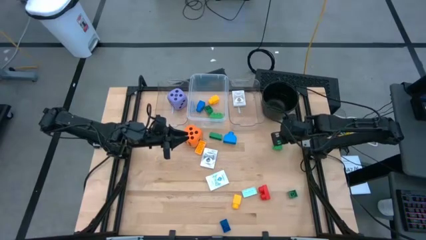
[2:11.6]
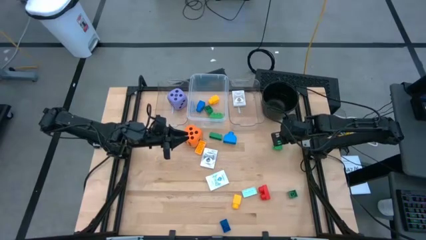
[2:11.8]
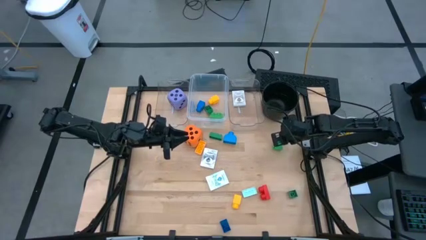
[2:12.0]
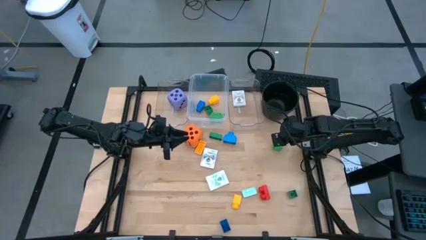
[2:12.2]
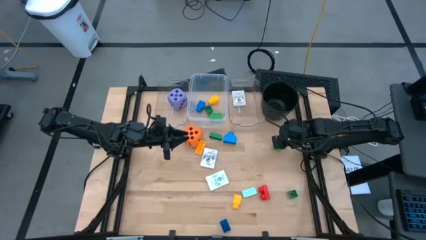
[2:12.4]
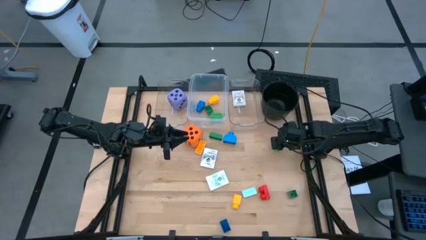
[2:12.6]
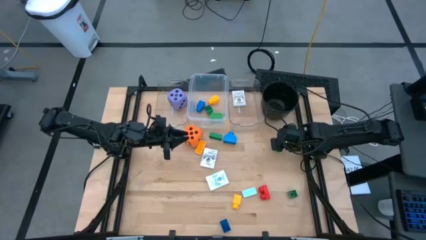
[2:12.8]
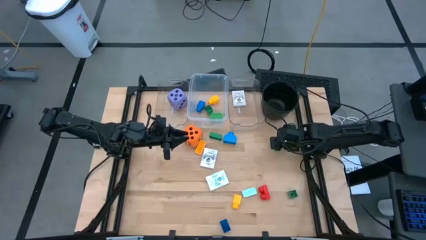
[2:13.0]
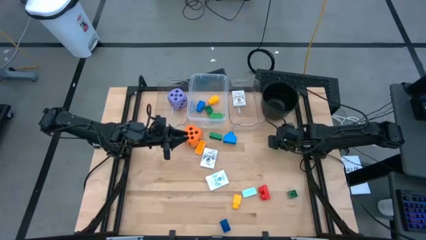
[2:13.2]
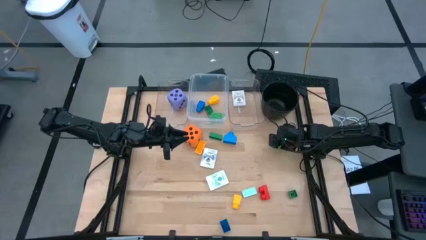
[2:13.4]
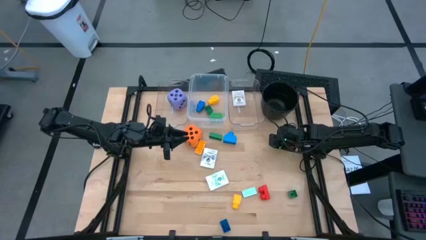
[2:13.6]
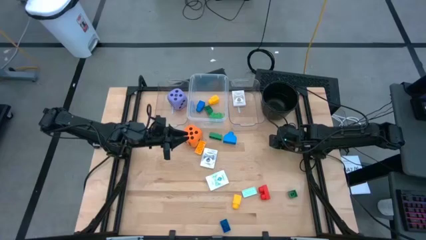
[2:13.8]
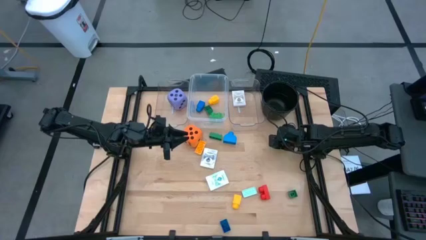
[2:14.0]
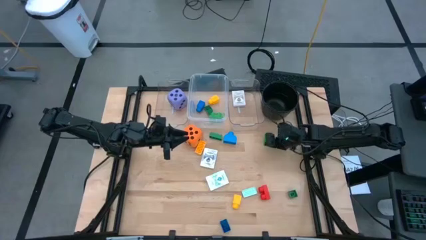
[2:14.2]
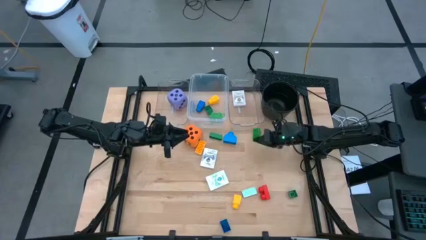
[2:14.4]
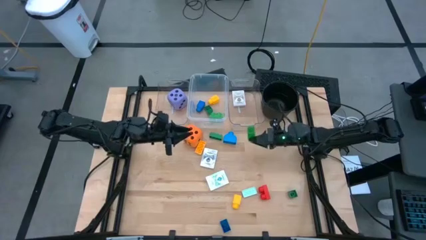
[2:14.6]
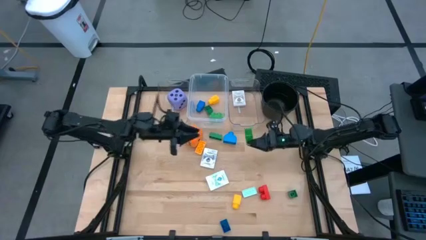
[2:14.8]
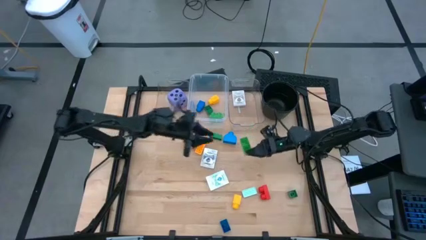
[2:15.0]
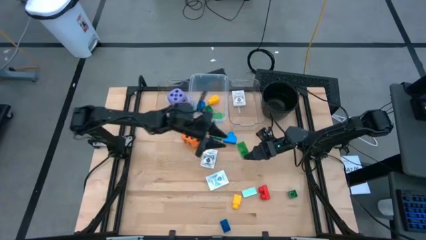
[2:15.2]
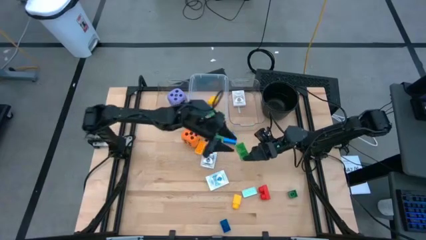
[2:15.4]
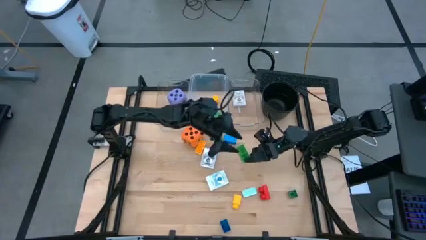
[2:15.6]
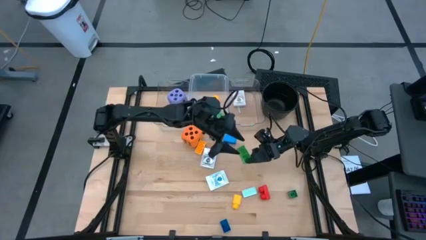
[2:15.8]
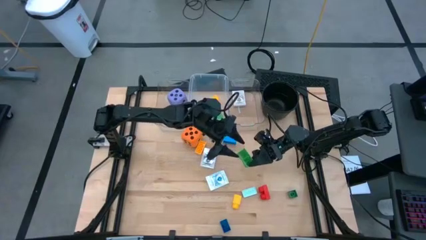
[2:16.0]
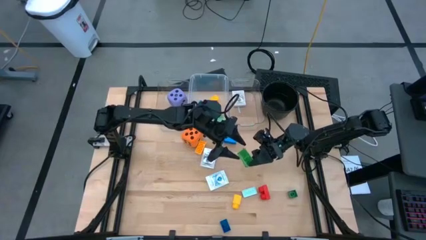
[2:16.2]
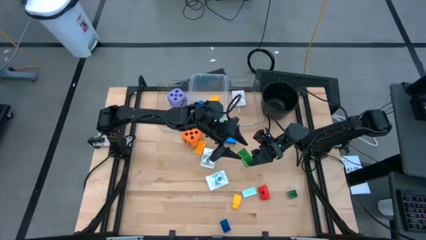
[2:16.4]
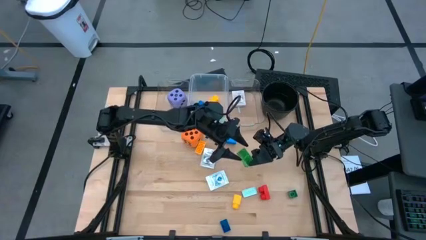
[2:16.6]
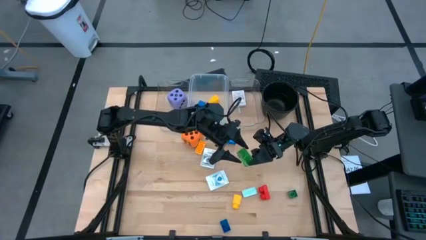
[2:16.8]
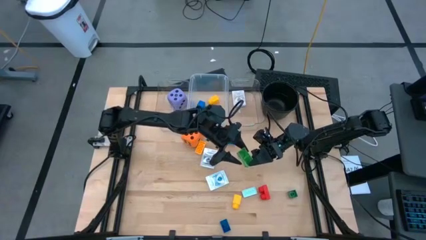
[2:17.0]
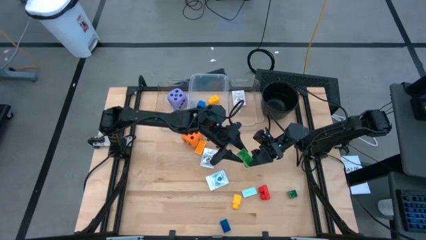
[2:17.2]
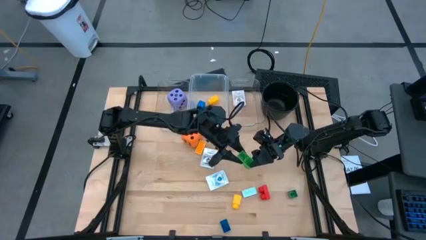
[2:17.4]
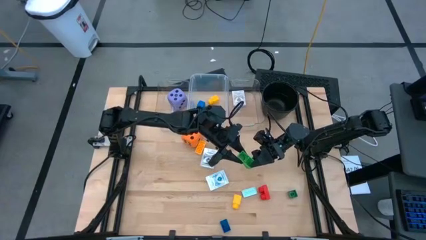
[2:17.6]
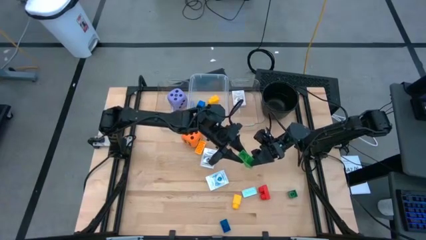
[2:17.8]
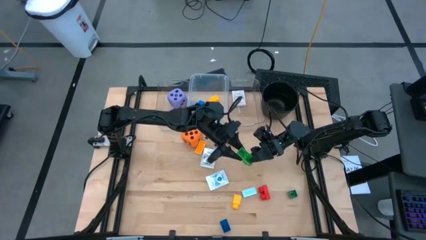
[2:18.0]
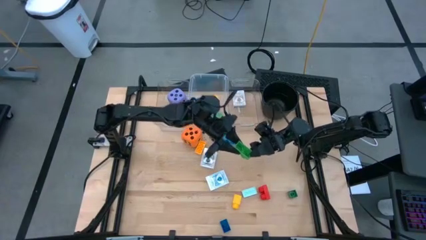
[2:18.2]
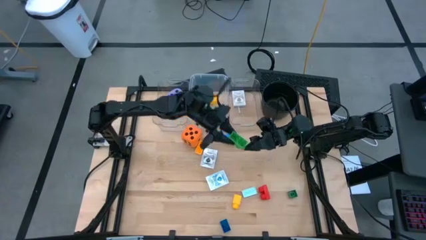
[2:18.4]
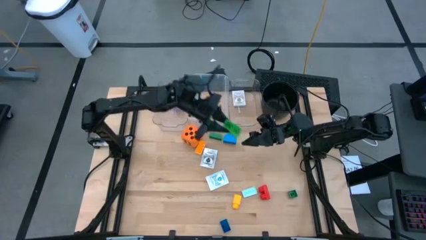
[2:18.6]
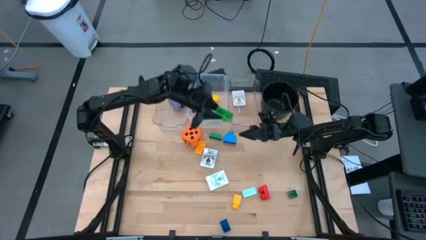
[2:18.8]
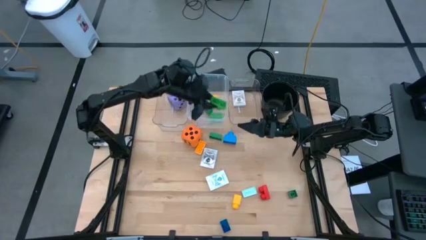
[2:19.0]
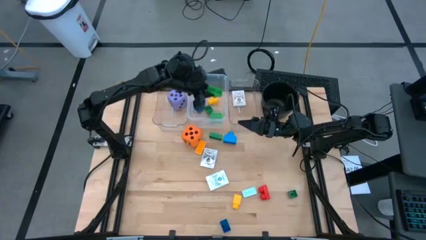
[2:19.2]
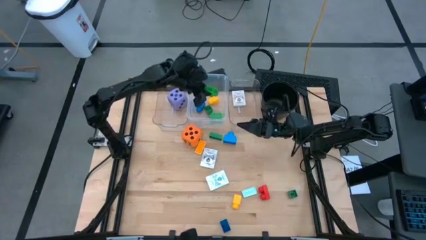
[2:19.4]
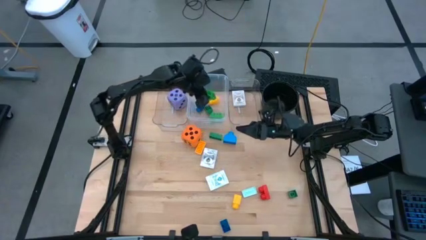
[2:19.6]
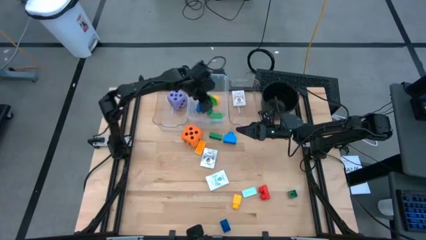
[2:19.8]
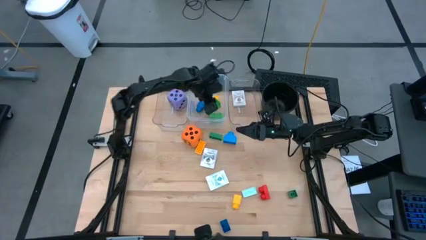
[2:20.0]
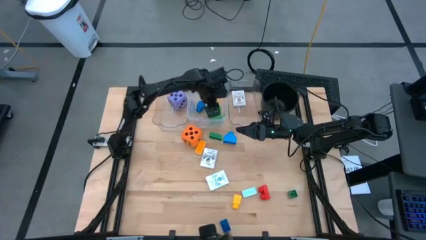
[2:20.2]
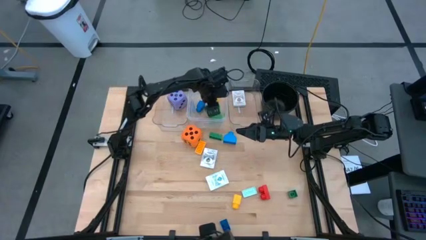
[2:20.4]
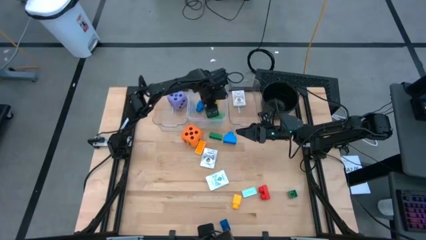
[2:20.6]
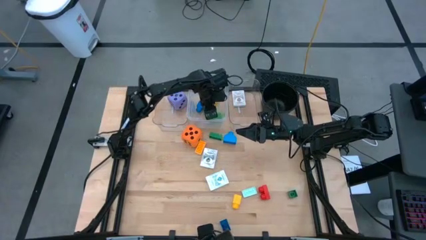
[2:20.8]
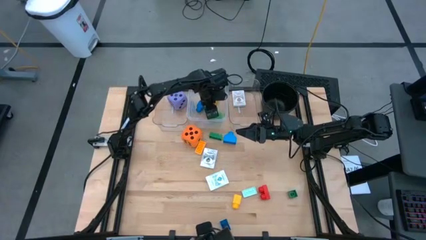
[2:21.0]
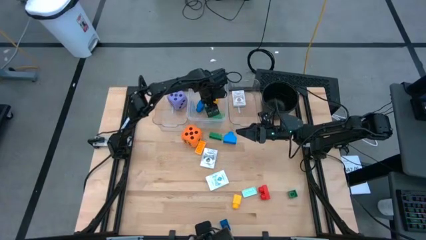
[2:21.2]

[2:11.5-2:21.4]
Task: Pick & Place Toys
Put the green two stud game piece into the middle transparent bin

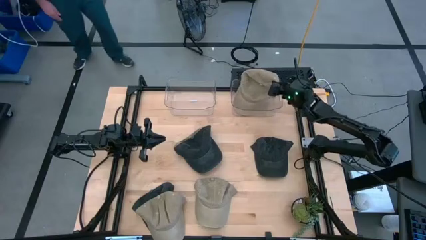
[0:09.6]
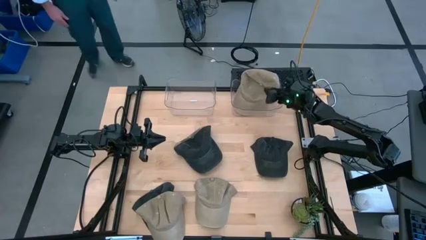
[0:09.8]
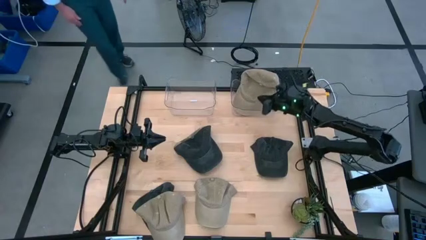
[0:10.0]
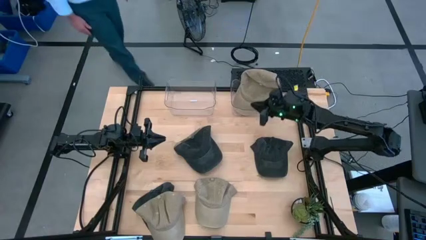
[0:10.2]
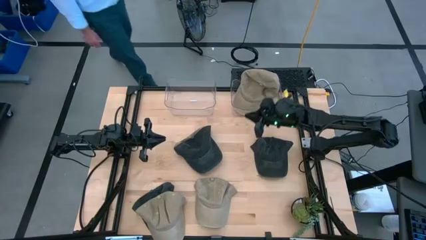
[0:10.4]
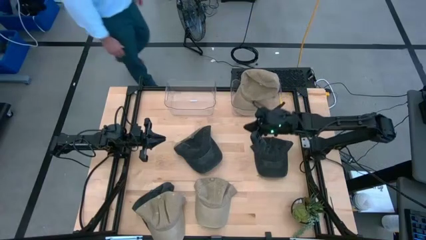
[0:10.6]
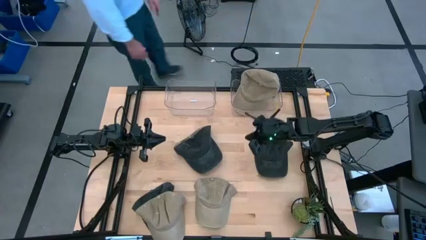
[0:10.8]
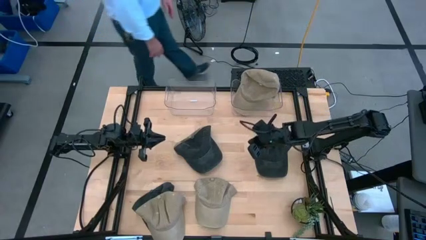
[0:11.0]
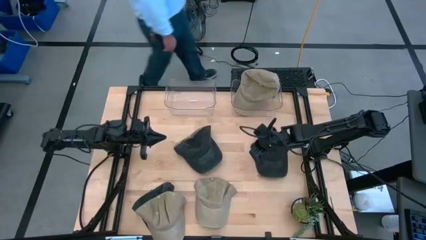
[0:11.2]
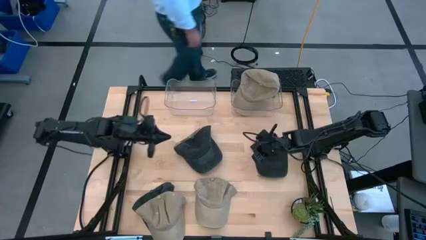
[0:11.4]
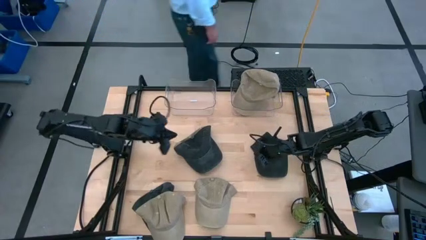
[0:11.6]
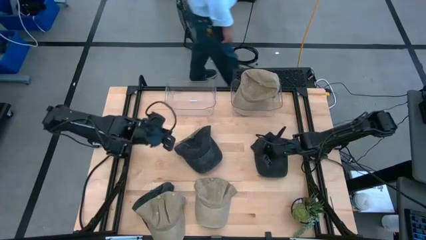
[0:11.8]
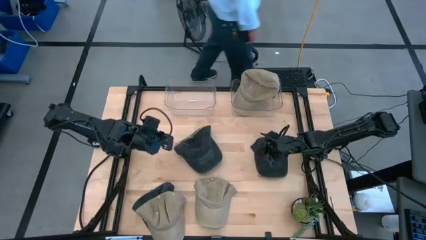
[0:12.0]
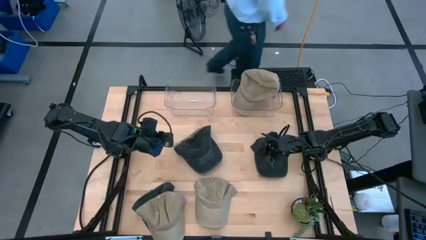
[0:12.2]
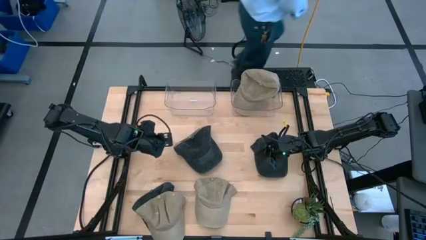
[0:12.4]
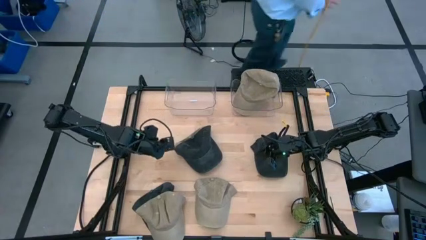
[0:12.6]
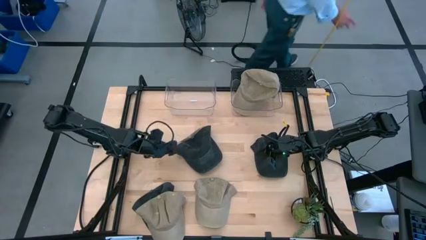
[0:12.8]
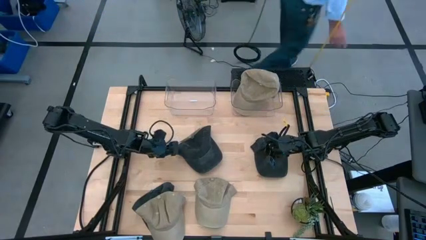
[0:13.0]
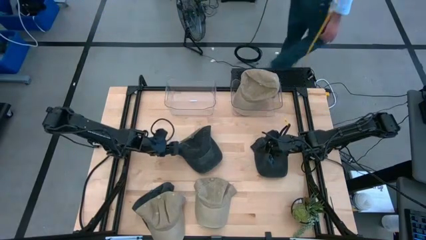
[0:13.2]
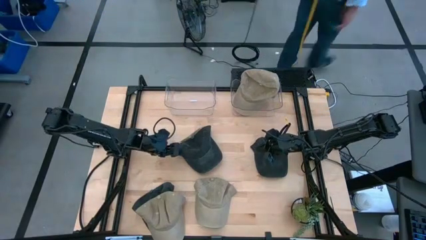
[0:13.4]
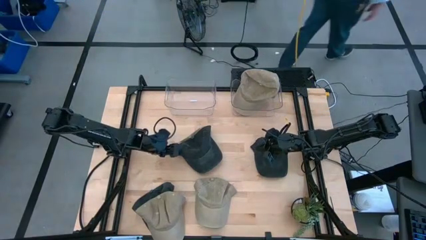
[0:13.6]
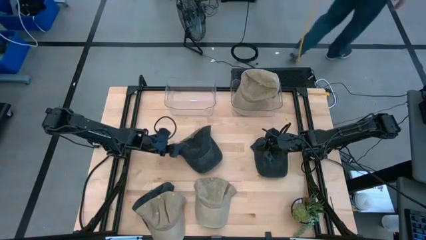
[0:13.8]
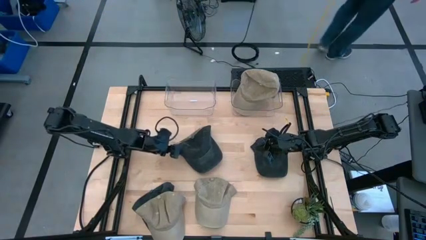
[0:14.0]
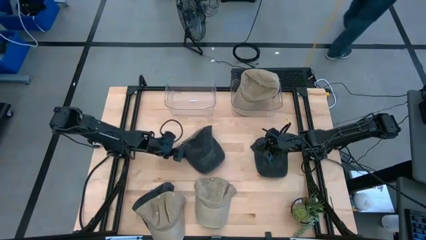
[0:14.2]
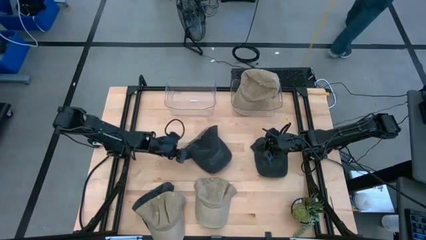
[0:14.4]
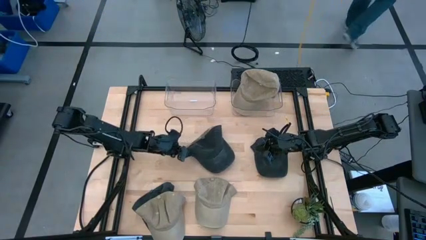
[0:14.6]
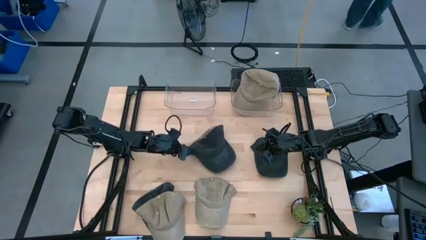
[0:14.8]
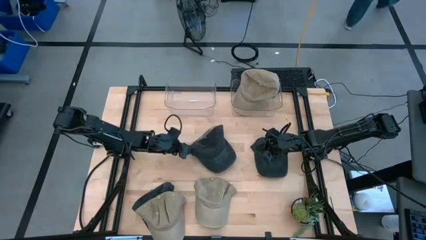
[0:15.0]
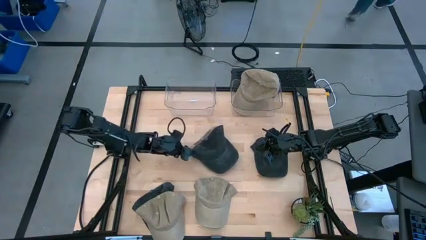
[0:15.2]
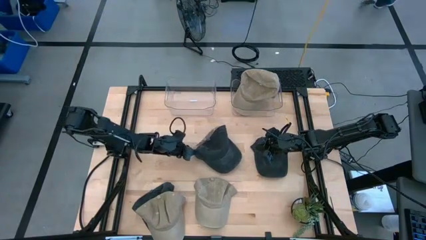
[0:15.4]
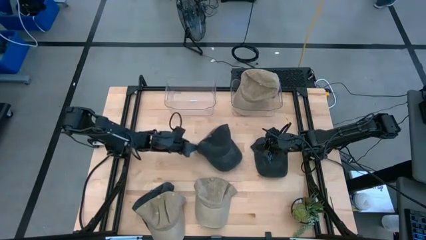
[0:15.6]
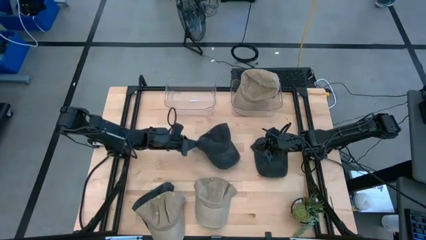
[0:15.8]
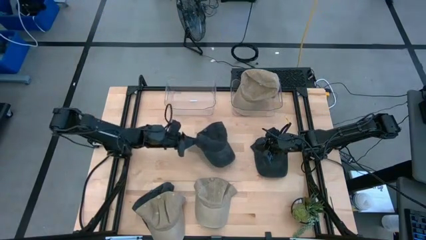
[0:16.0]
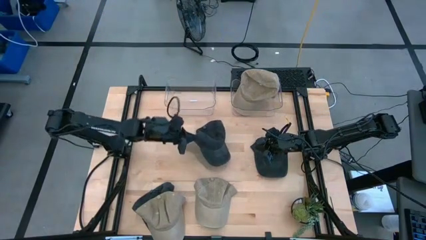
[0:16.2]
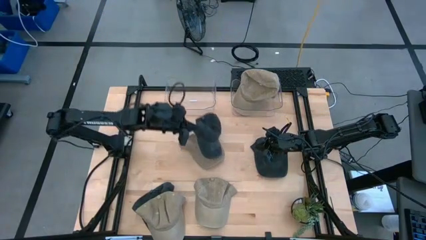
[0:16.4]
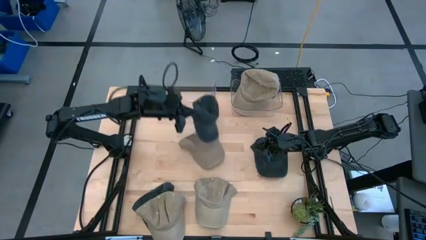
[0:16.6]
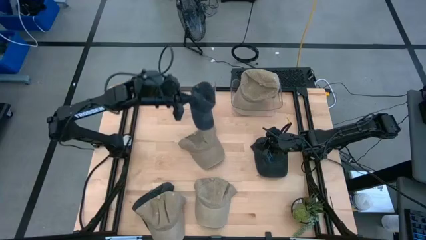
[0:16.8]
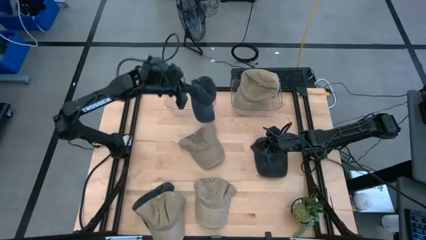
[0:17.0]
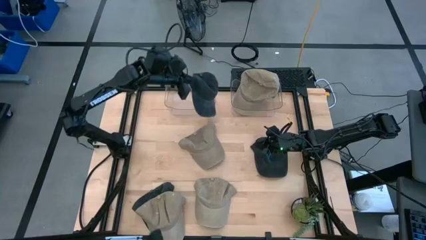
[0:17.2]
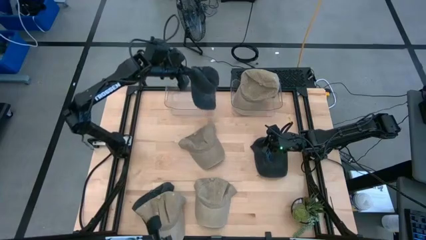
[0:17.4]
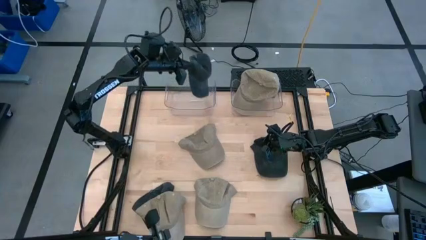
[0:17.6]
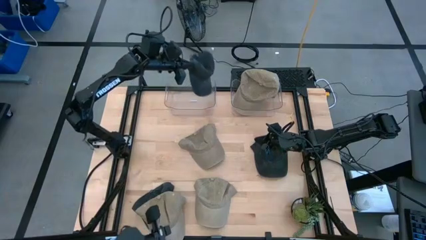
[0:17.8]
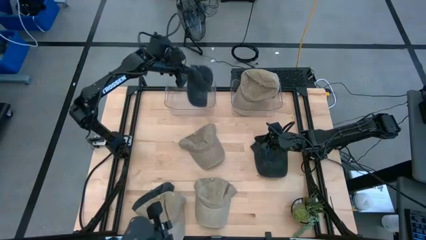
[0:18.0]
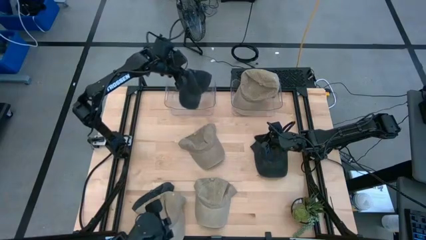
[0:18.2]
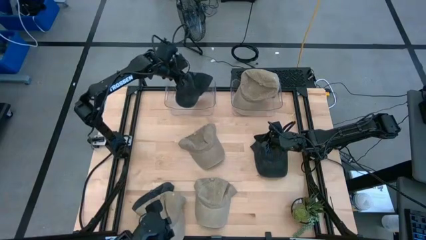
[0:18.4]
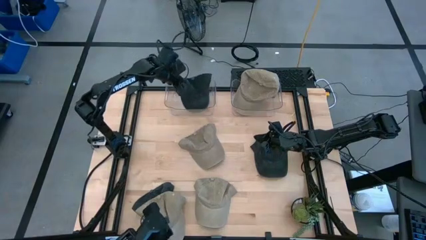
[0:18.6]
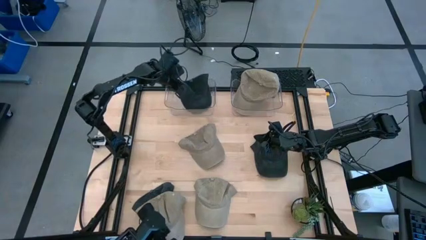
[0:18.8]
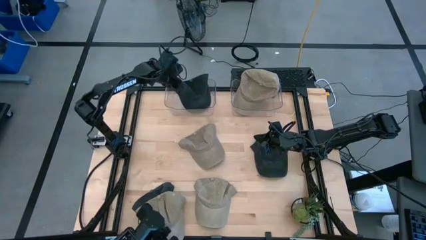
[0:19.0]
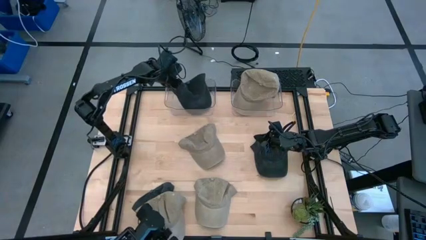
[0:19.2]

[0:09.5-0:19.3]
Task: Pick & Place hat
Put the black cap into the left transparent bin
